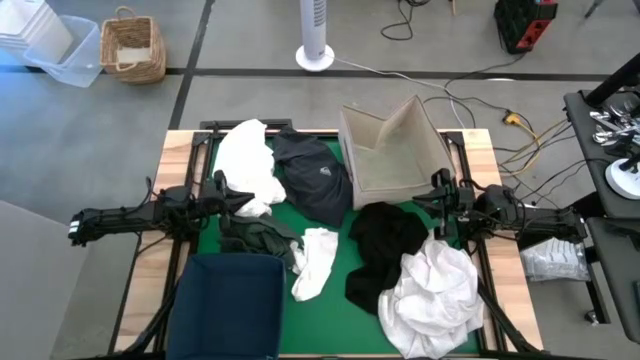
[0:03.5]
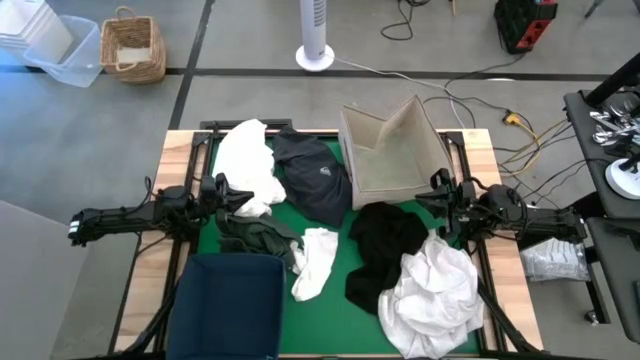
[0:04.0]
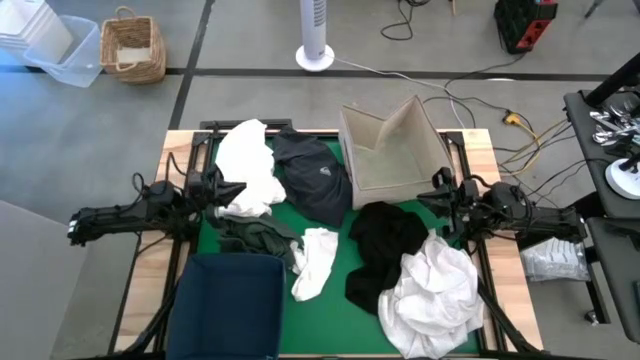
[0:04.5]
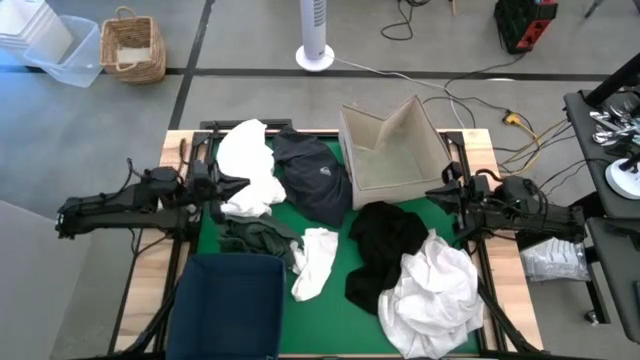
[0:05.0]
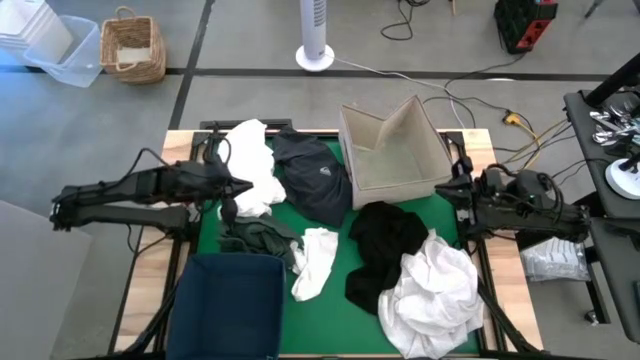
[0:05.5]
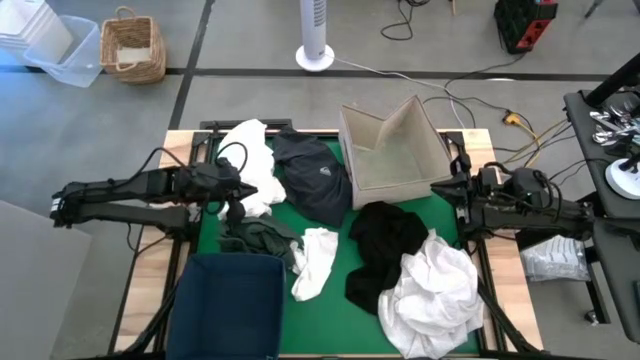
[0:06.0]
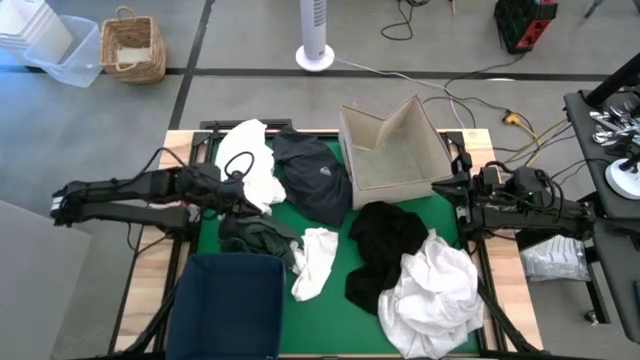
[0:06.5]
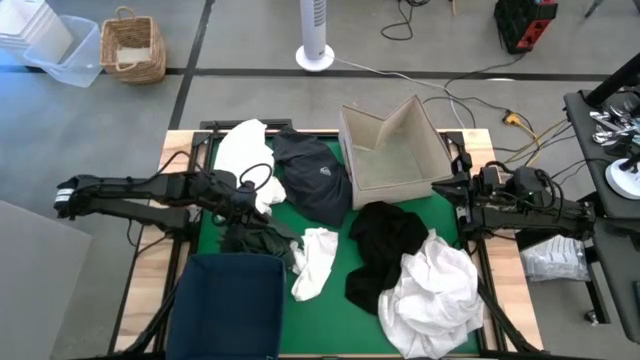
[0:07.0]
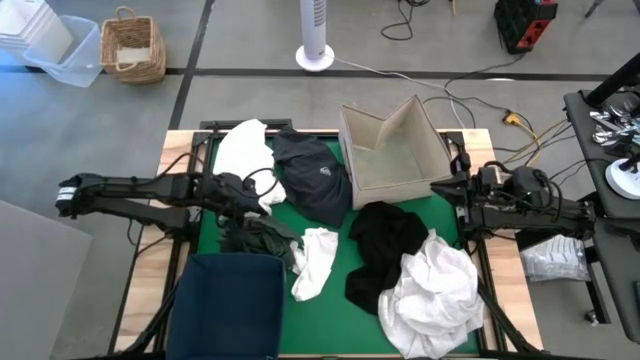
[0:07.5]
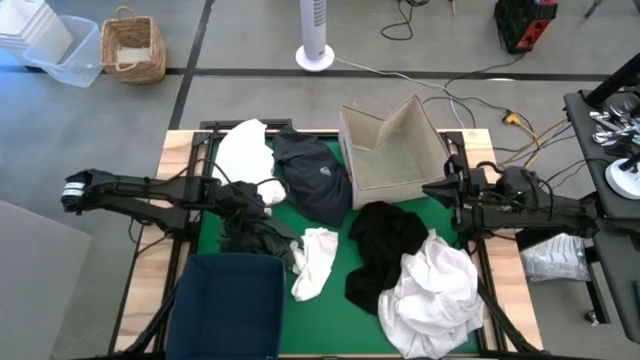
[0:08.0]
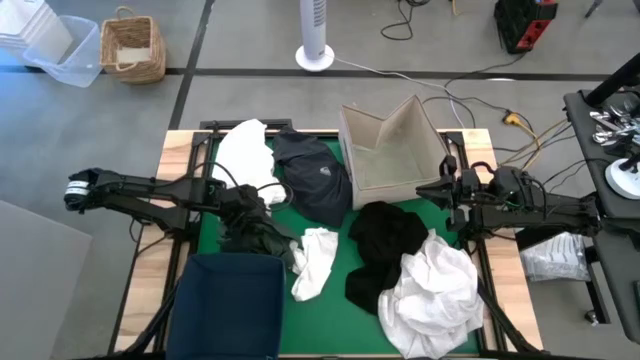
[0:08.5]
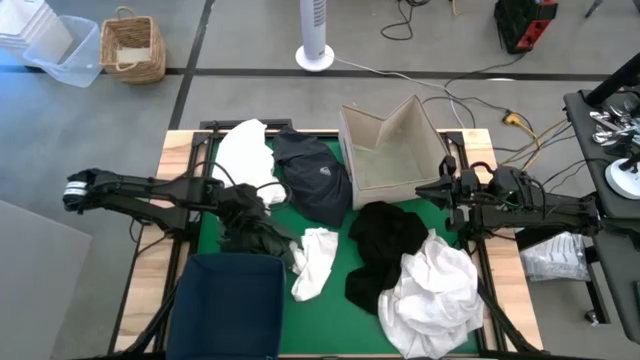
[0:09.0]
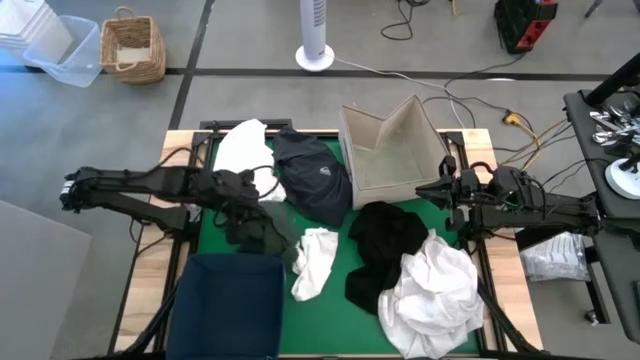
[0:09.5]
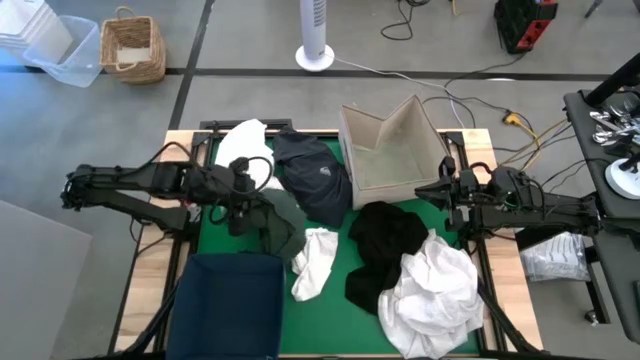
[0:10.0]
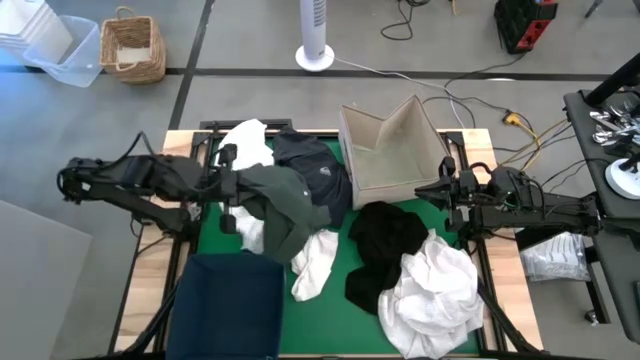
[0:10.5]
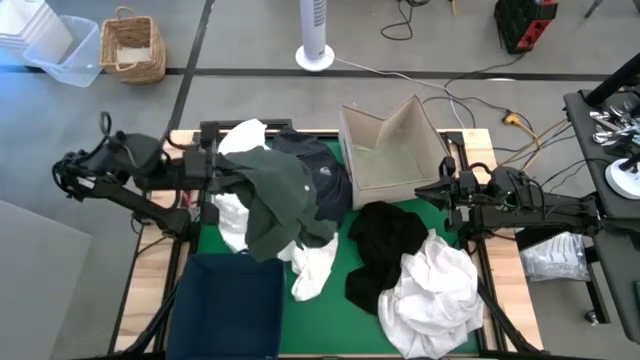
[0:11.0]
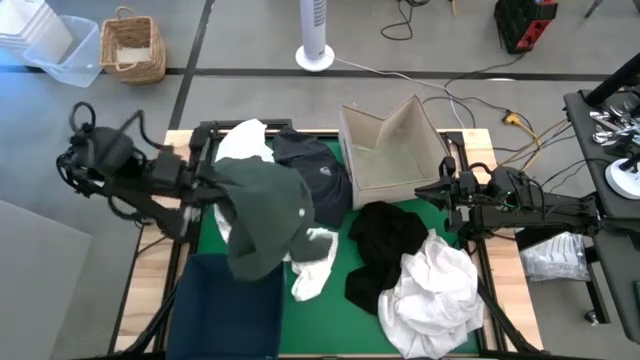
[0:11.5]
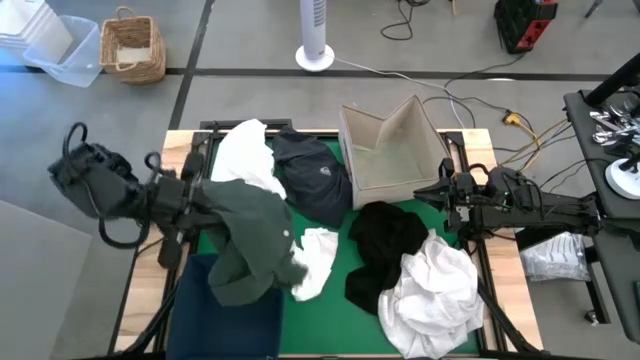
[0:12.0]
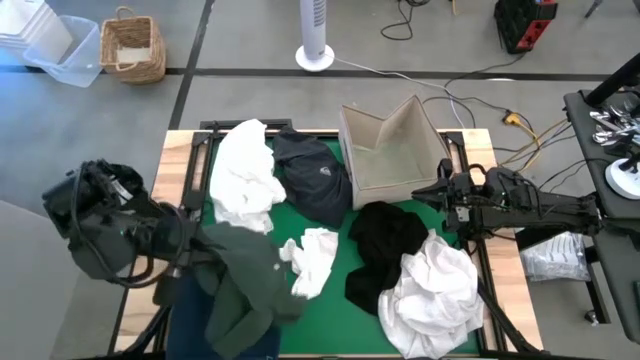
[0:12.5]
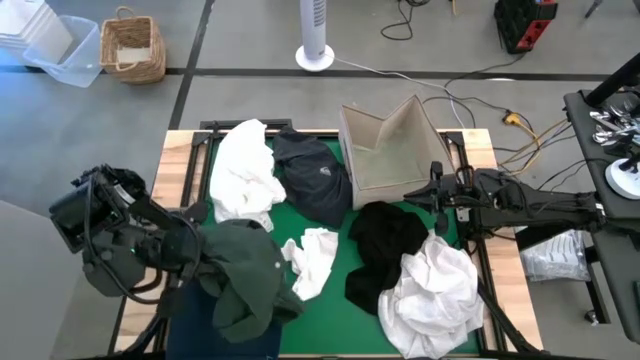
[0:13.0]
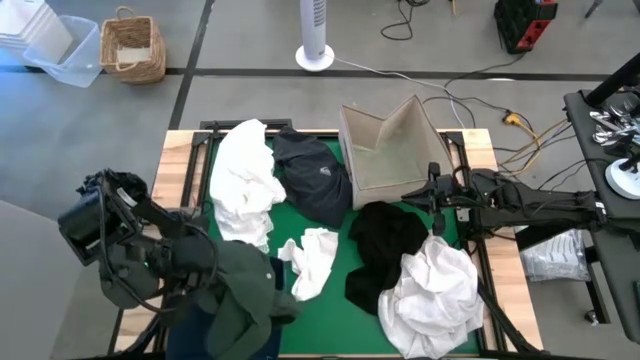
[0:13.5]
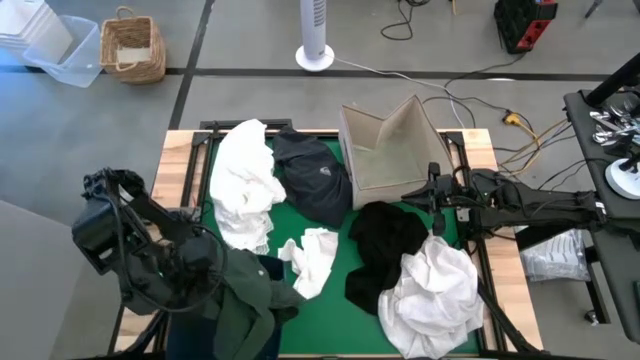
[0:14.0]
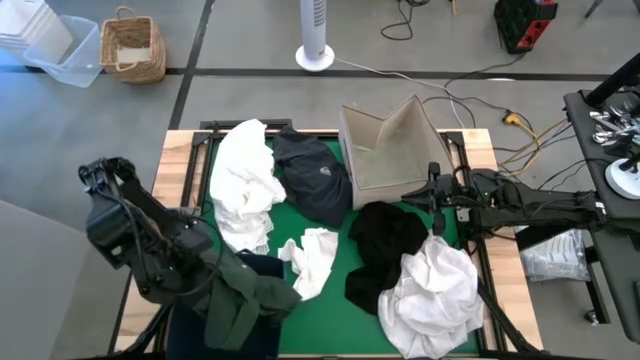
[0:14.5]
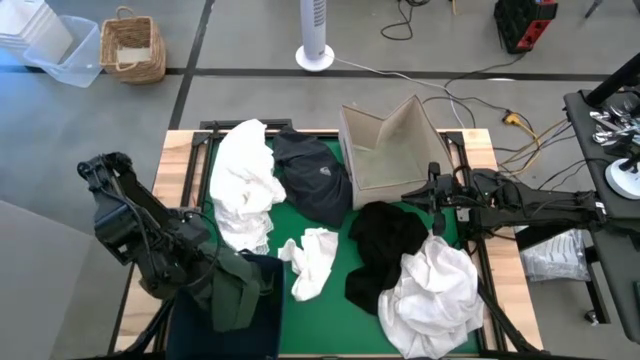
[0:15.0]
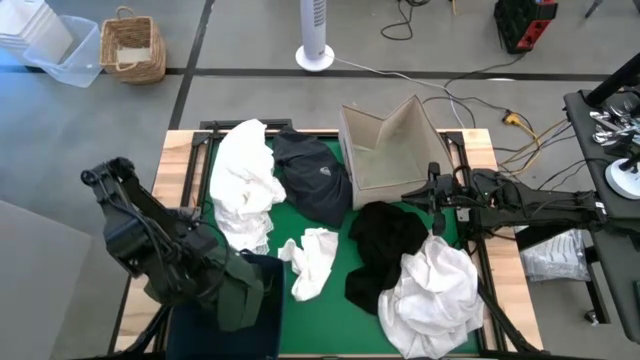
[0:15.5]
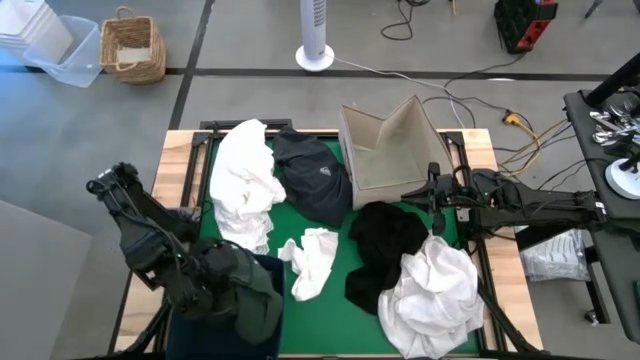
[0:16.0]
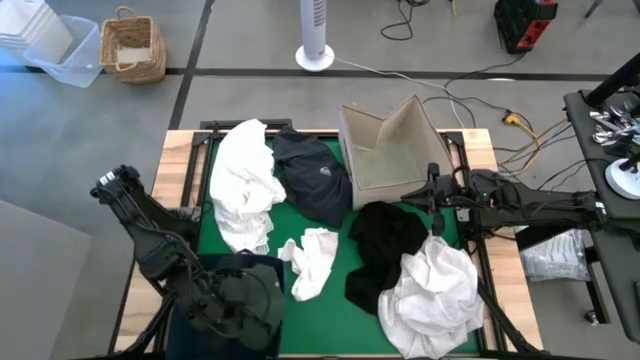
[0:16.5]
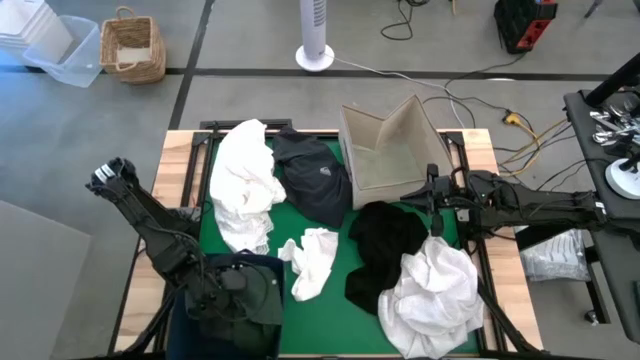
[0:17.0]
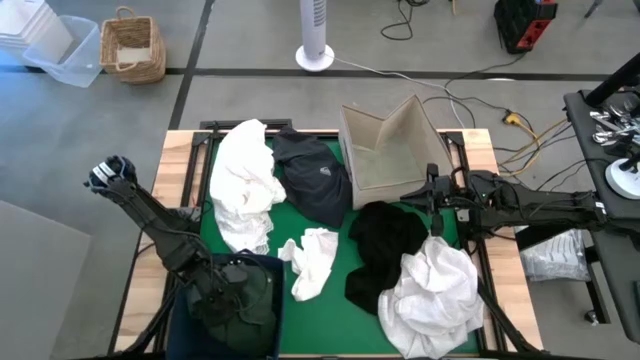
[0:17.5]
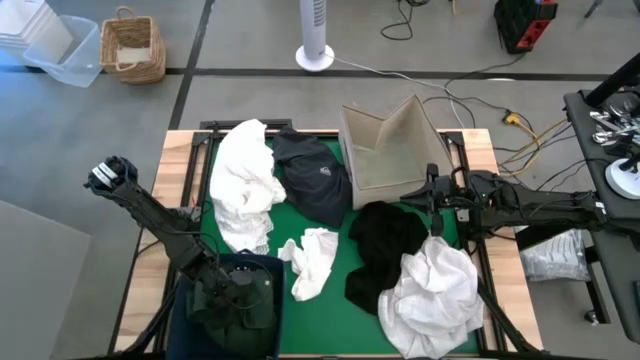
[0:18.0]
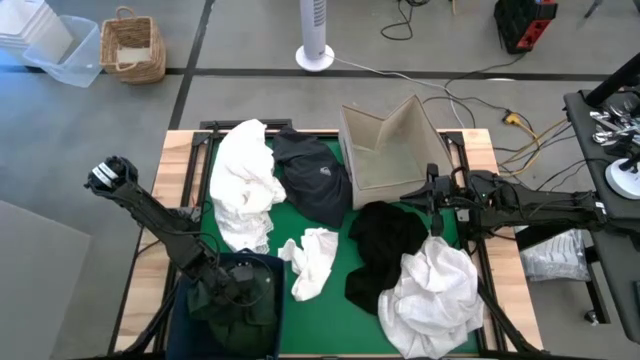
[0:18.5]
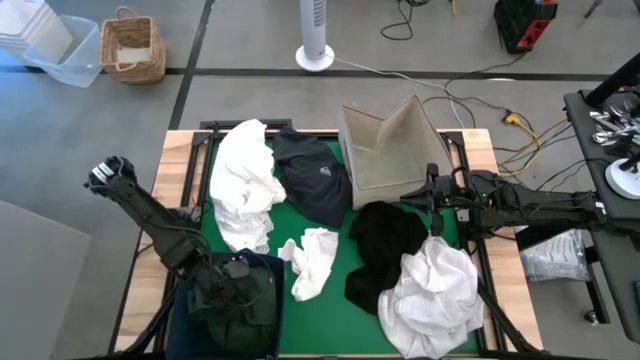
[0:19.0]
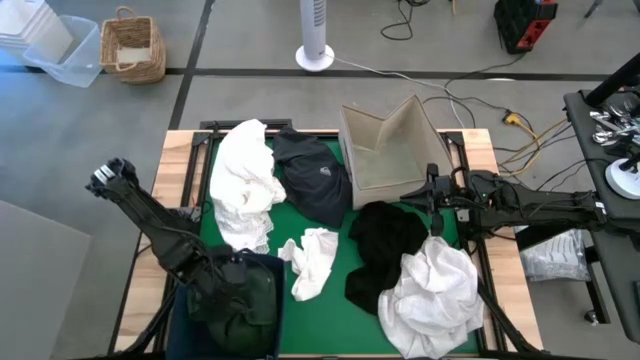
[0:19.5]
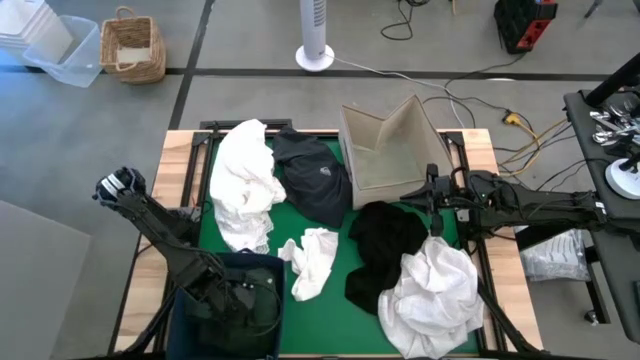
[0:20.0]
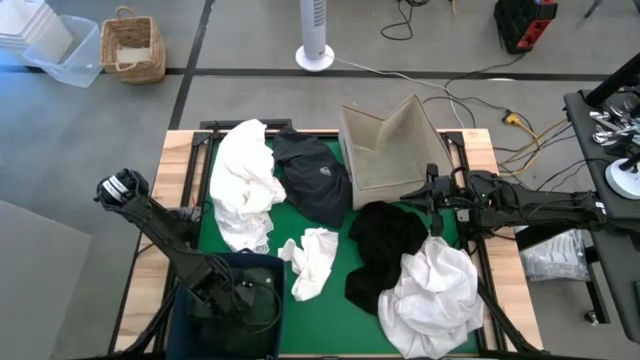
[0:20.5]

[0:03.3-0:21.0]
Put the green shirt into the blue laundry organizer
